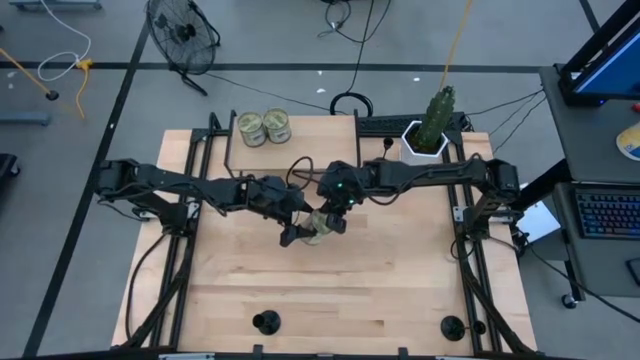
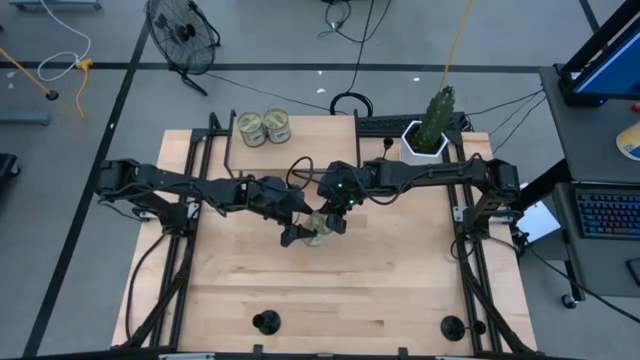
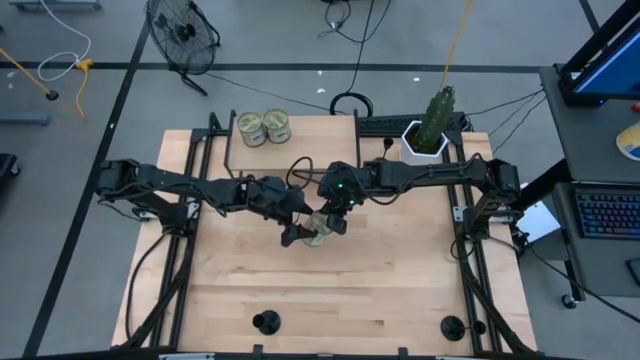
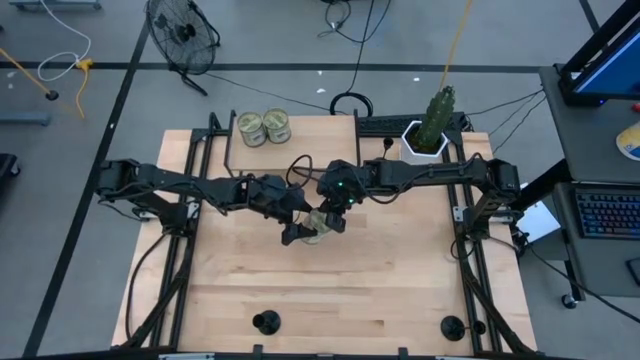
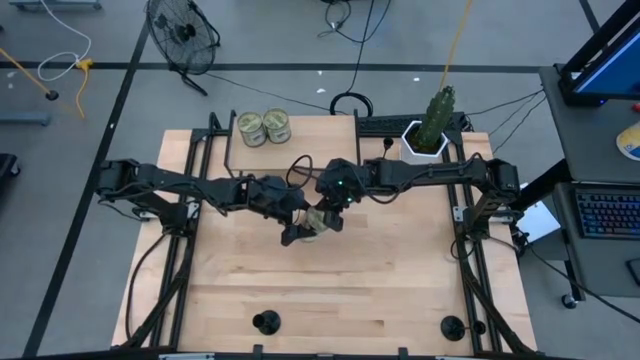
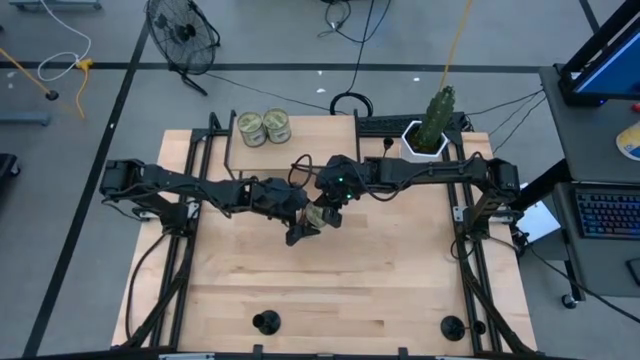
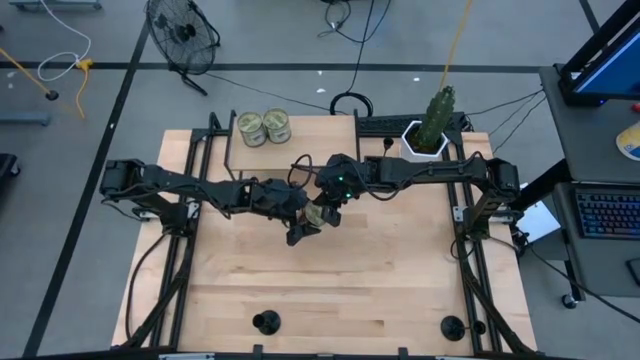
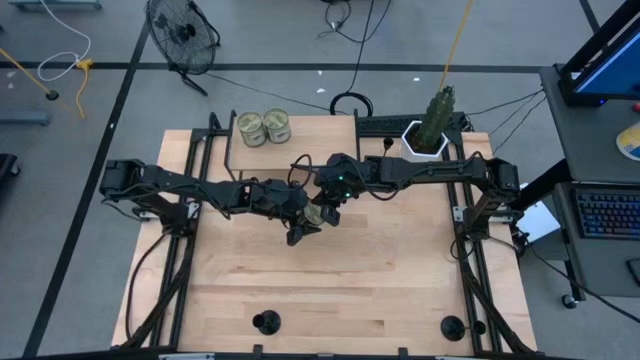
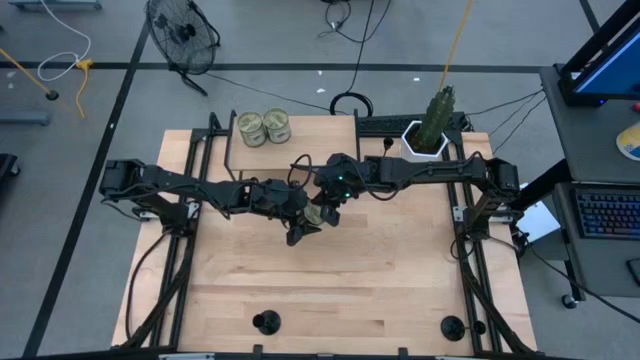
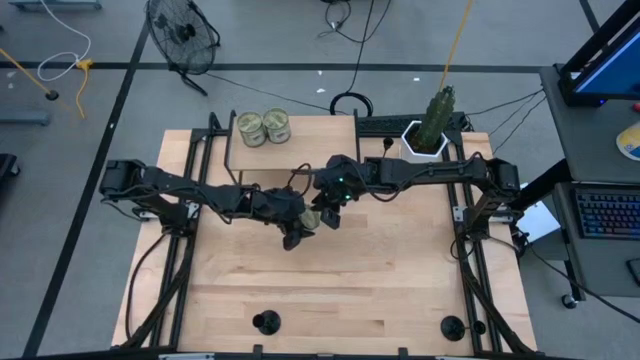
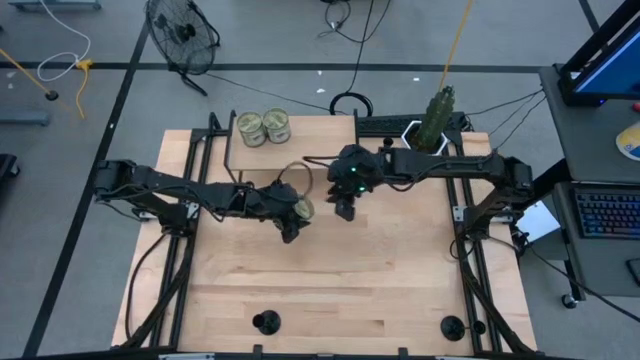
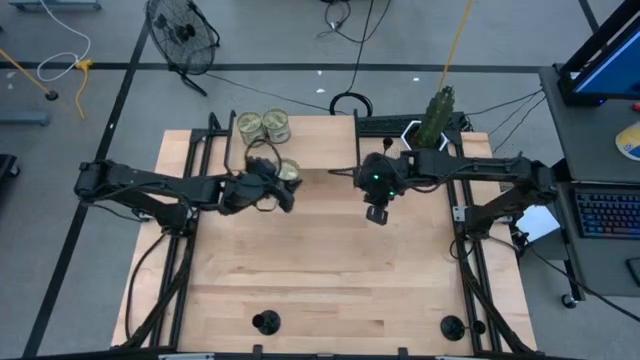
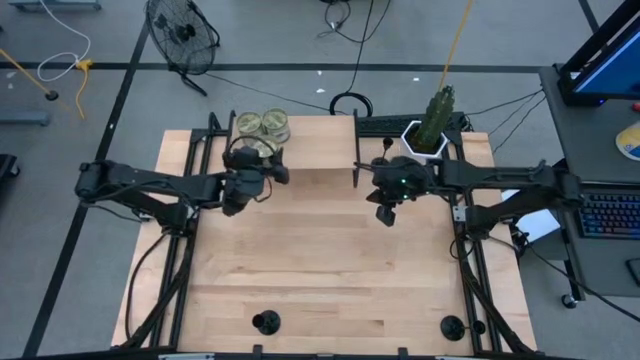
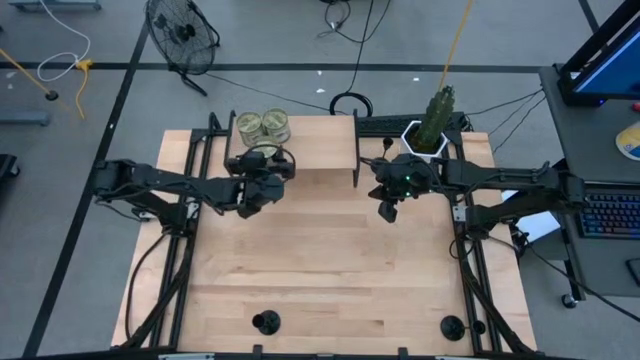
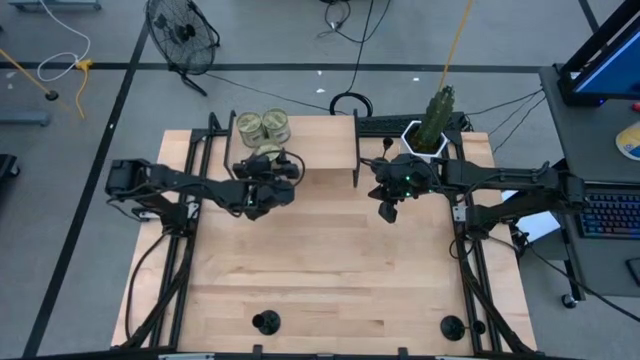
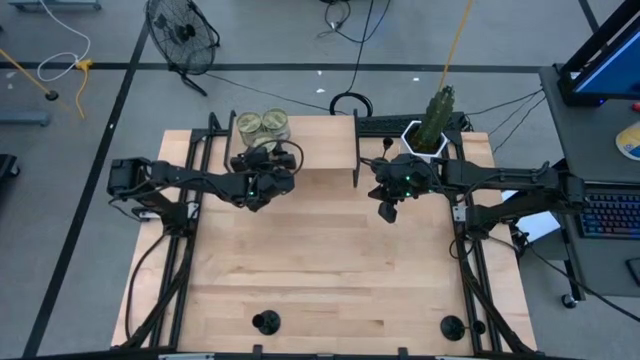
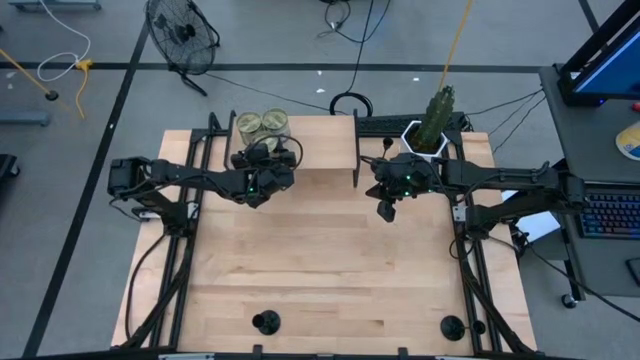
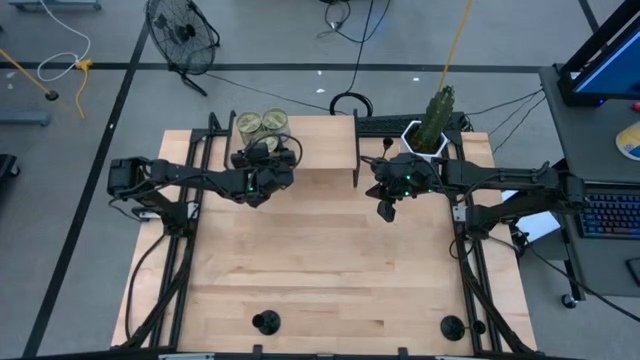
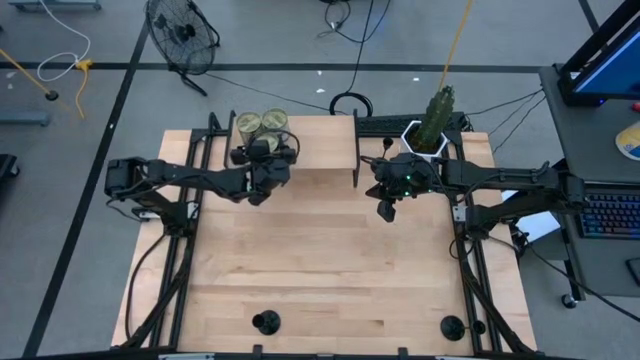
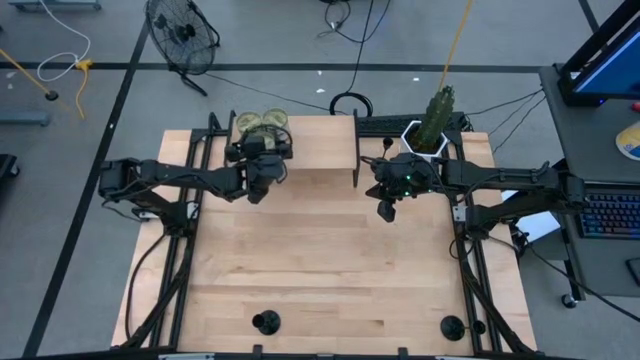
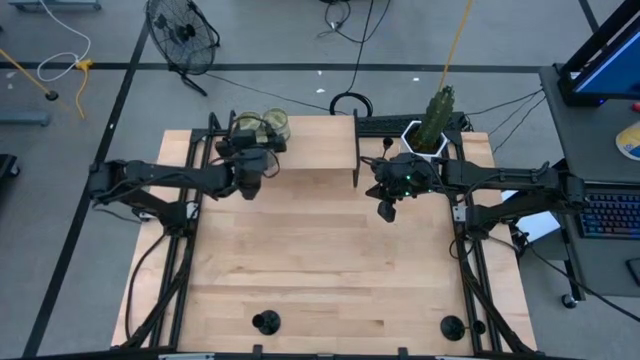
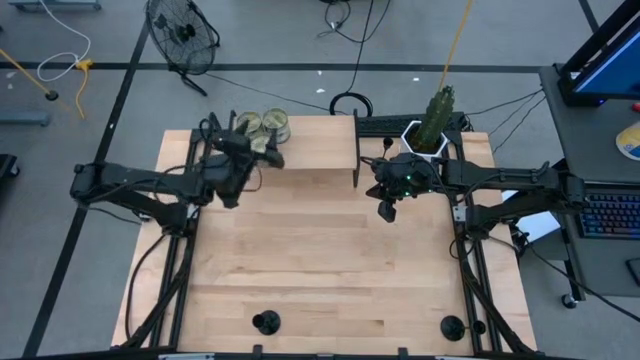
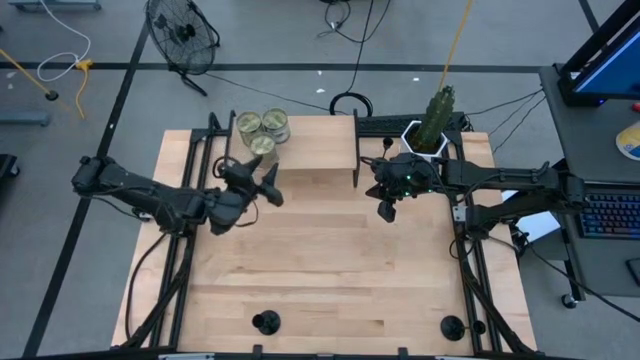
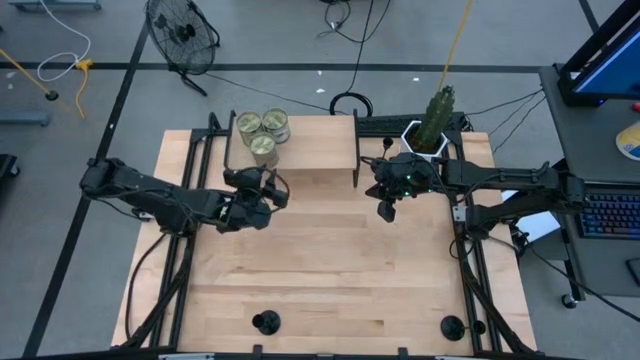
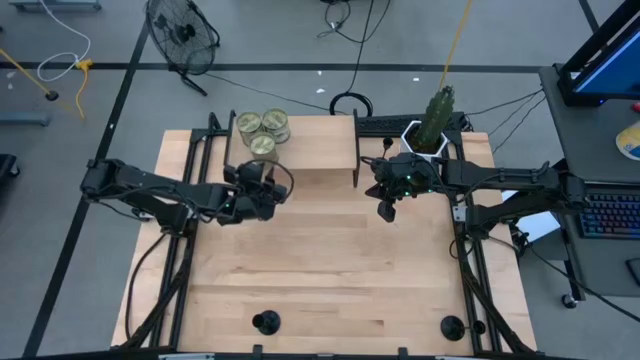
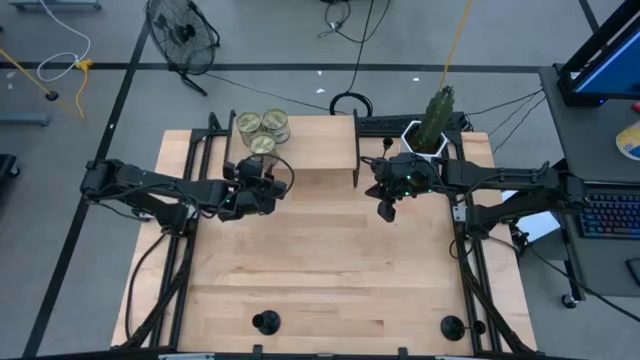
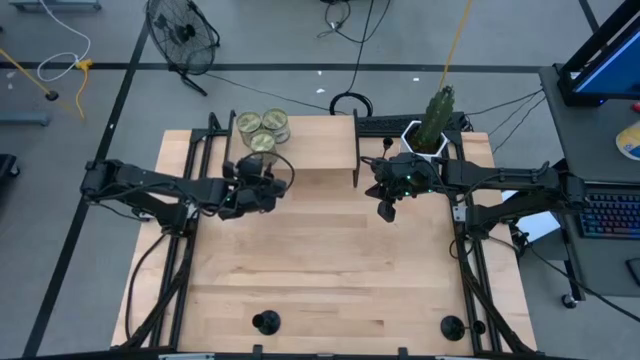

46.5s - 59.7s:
Task: Pick & Place candle stick holders
Put the green scented candle on the shelf
